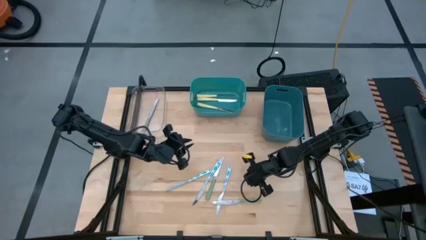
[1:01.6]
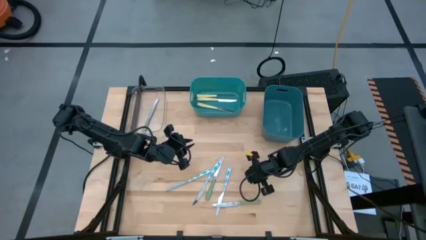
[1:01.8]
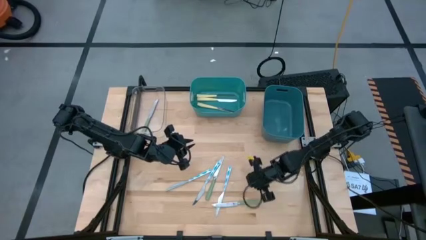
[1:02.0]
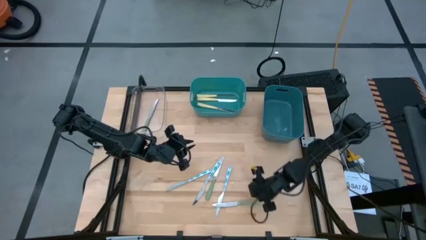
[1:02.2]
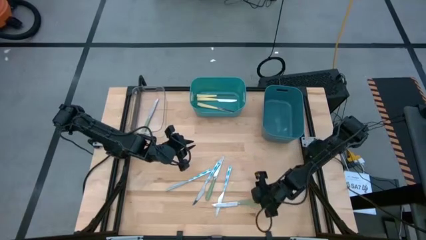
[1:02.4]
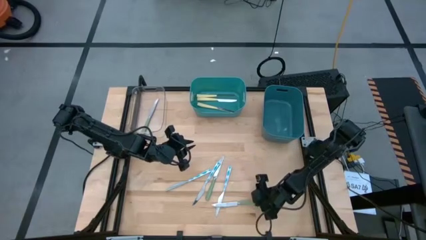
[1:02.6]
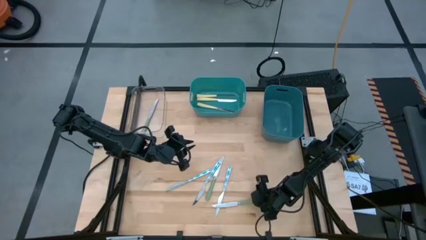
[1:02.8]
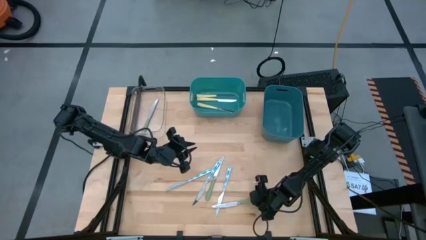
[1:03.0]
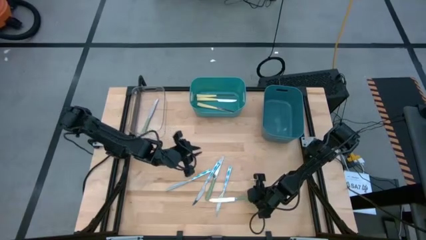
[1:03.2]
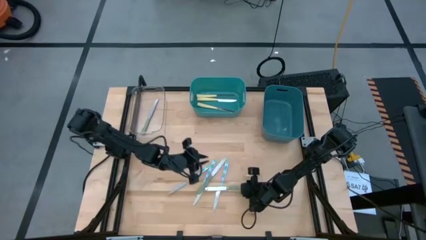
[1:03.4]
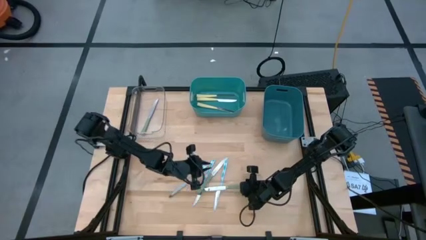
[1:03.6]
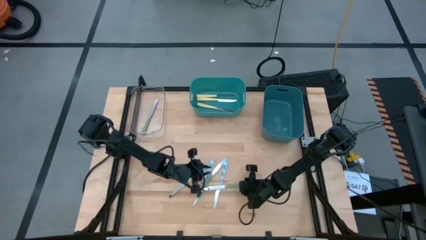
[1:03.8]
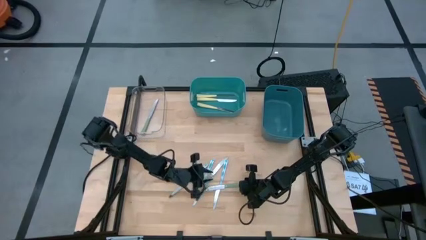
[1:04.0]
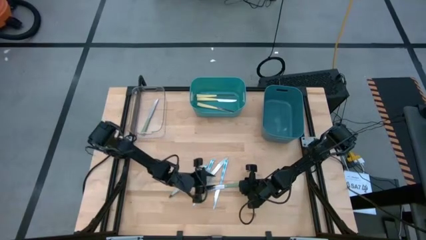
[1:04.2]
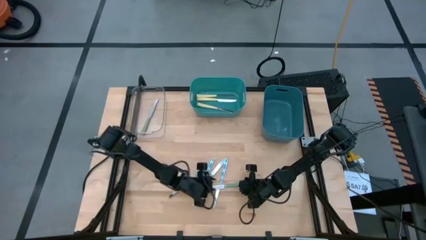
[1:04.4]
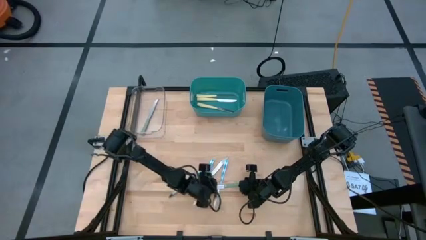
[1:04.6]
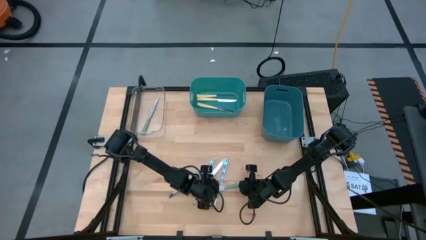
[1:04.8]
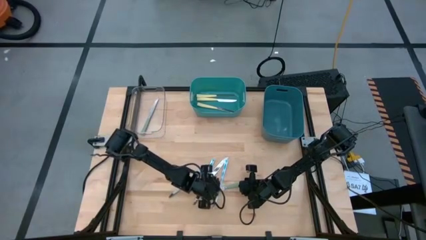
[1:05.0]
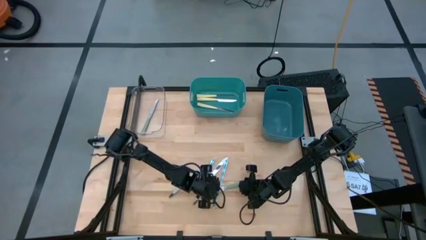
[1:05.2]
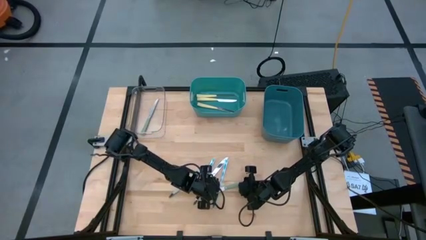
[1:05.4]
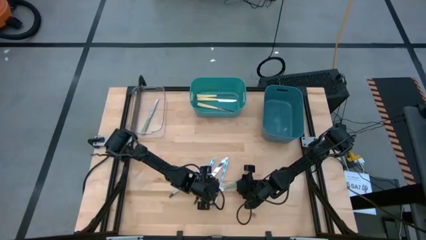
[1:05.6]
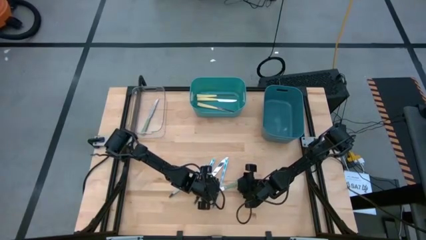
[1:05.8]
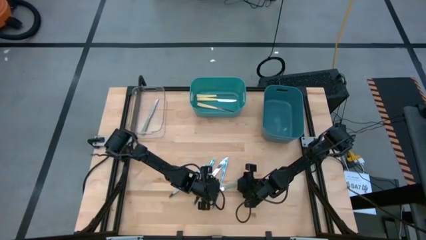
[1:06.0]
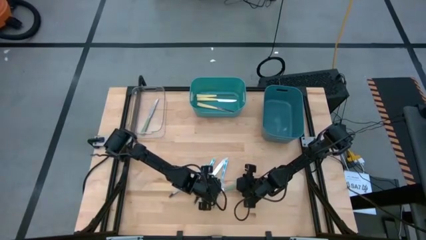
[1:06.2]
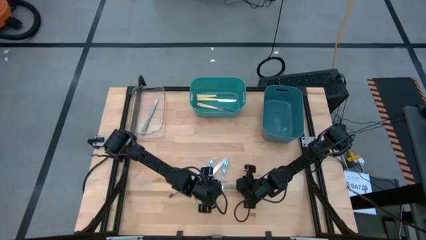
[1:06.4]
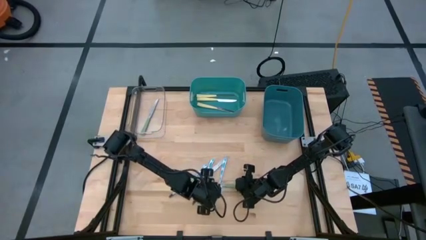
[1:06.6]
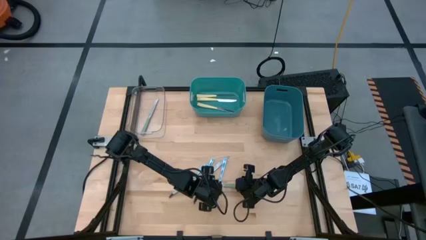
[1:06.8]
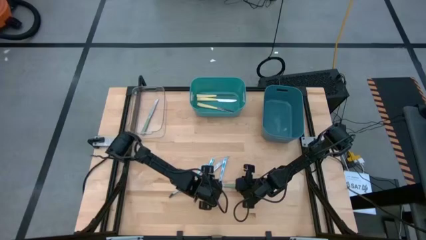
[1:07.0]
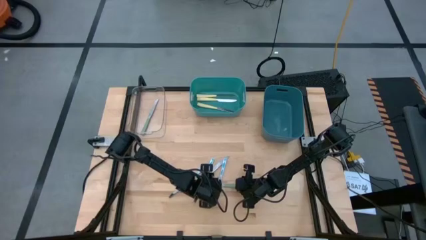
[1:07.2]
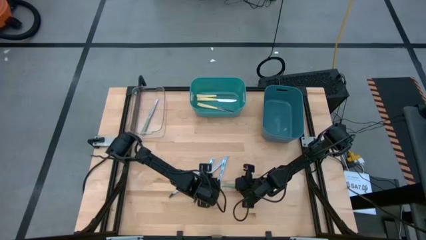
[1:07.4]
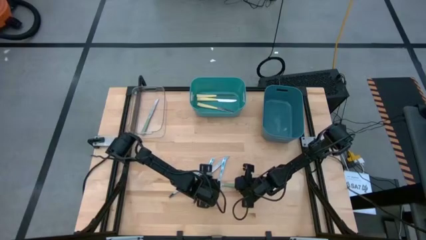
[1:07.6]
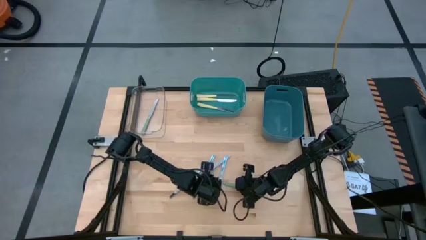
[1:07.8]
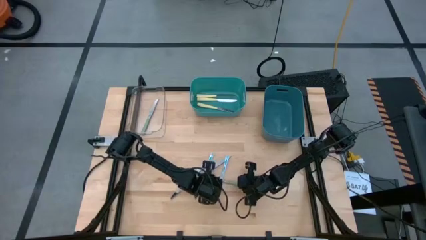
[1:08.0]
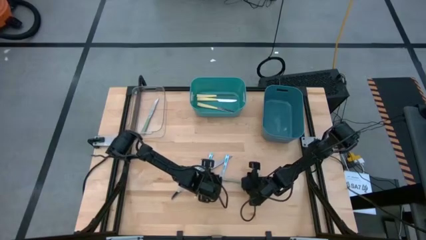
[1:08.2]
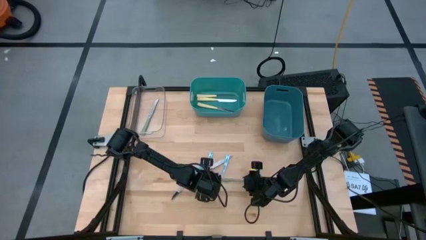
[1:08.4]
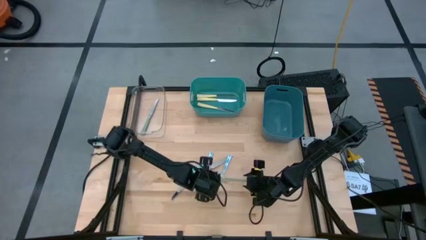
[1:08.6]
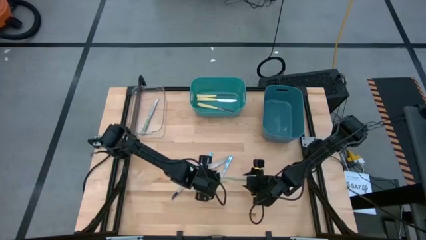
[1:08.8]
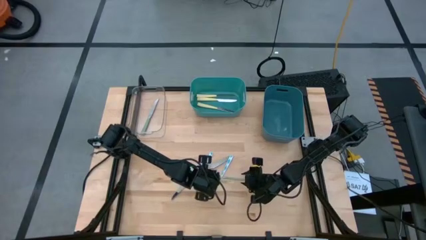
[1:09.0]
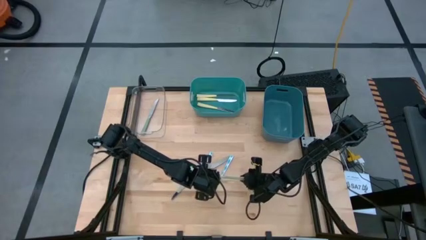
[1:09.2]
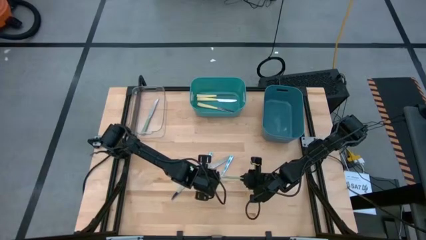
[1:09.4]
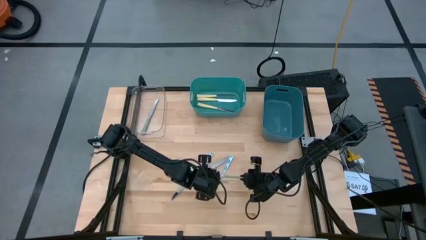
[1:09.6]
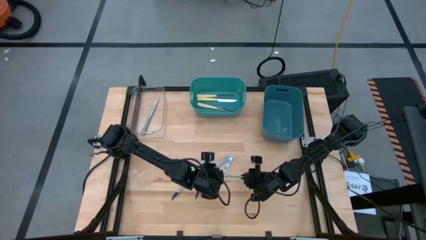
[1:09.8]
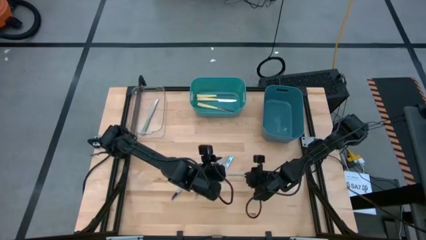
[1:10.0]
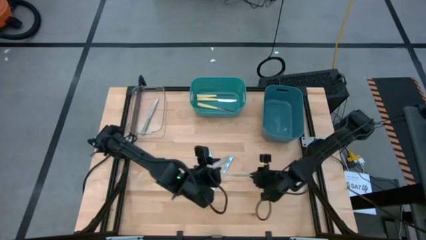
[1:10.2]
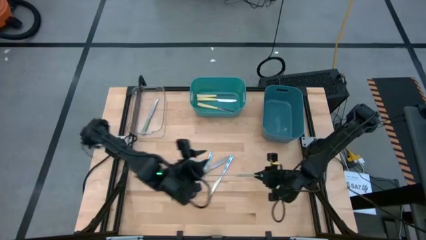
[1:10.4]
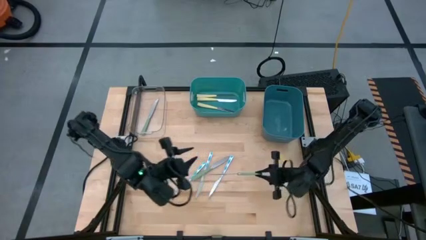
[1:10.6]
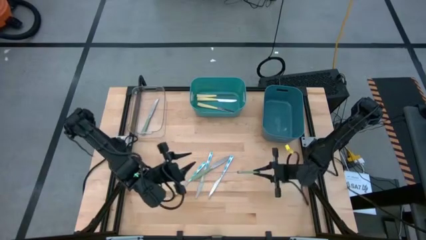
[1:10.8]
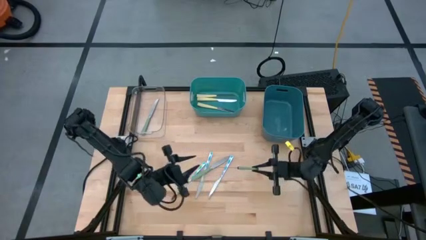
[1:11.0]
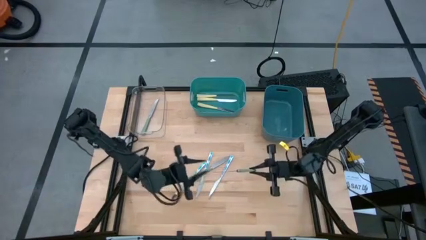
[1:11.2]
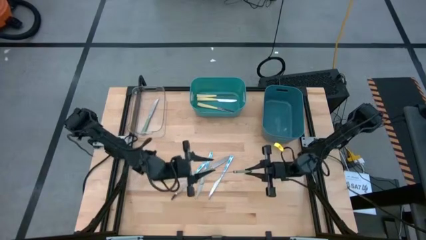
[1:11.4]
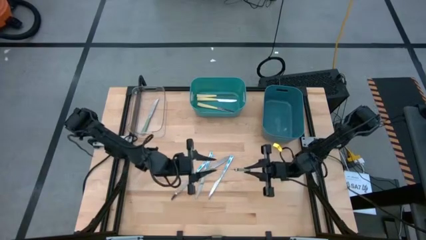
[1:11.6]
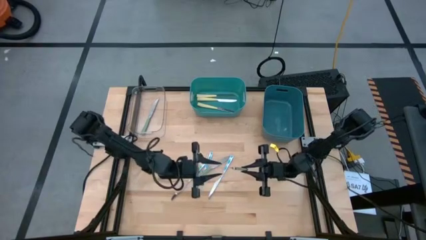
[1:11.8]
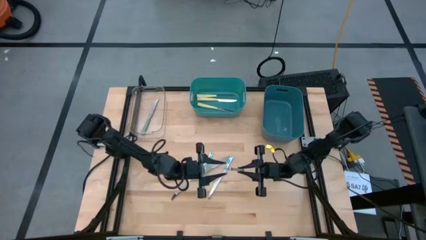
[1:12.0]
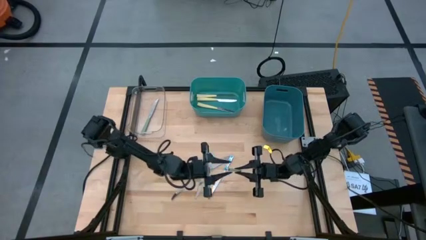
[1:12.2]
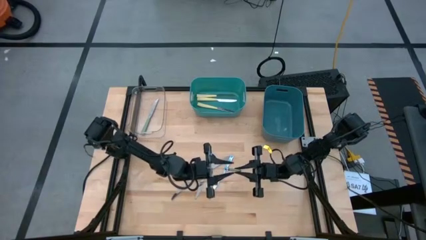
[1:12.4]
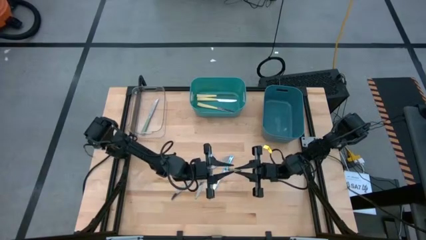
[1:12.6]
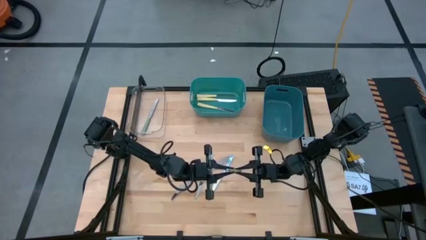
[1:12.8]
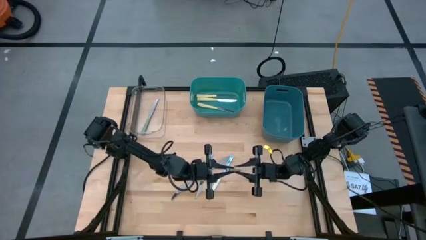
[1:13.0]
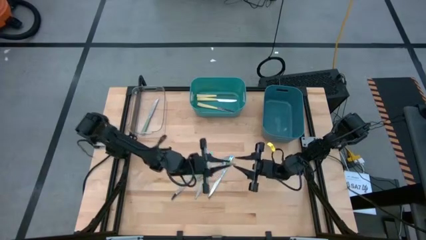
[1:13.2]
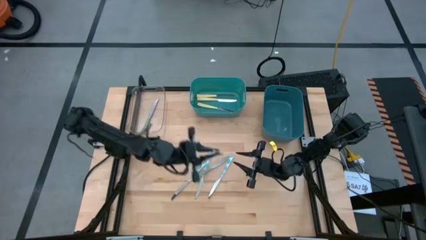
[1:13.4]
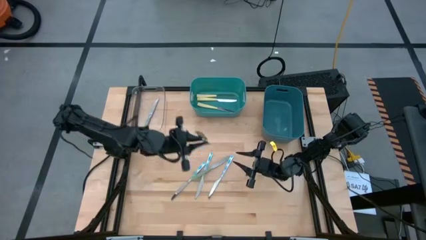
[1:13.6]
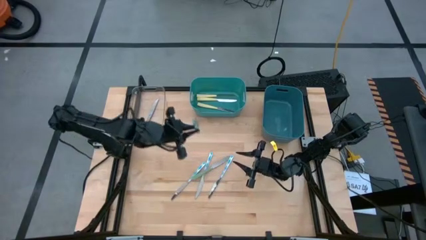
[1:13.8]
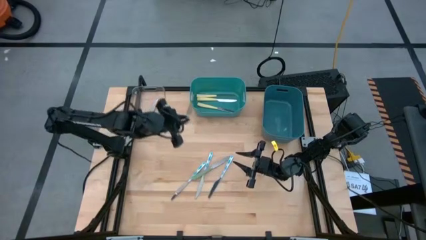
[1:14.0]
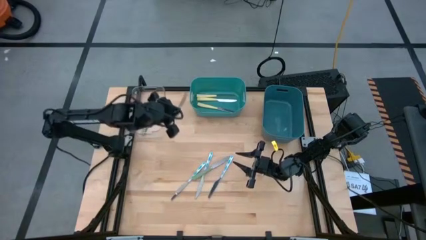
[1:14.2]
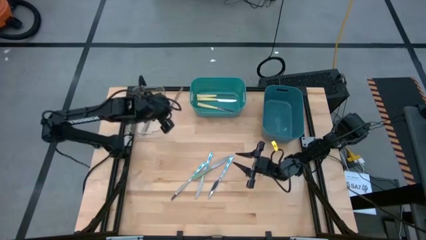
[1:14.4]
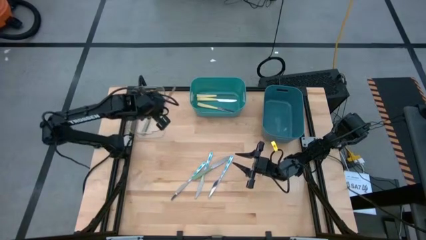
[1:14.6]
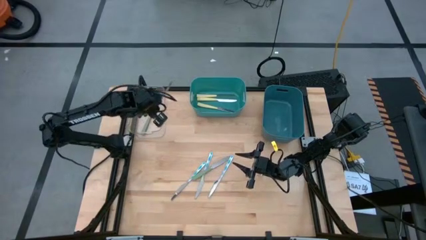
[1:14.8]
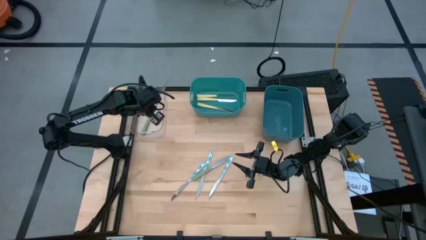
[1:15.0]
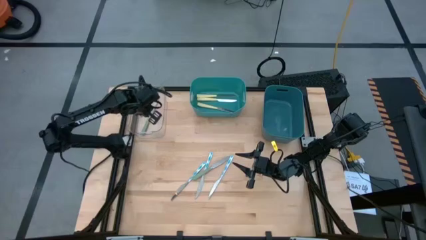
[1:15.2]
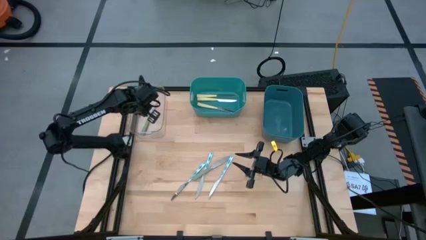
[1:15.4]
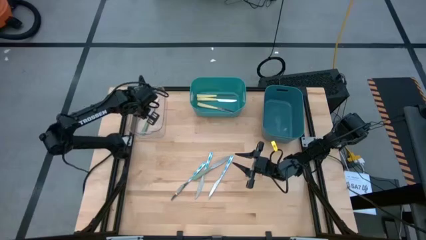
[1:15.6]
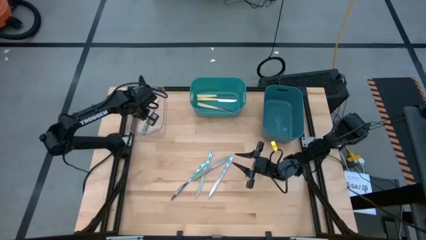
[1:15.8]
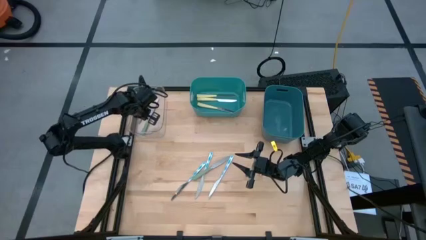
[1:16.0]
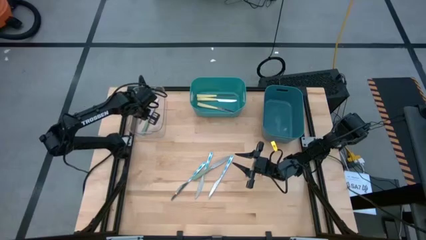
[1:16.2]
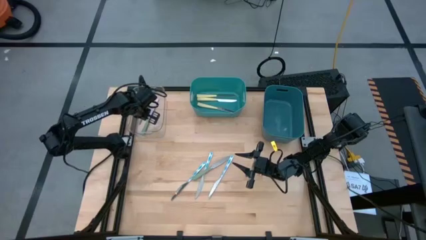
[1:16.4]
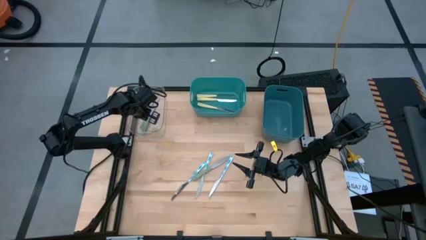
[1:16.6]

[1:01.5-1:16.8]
Task: Sort silverware by color (type)
Put the right green knife into the transparent bin
